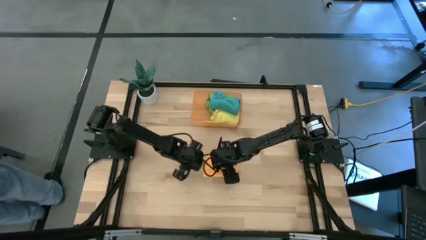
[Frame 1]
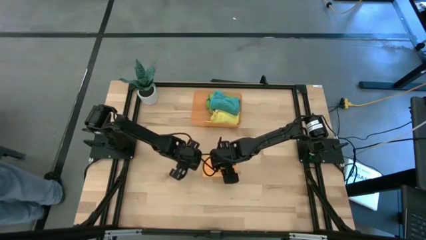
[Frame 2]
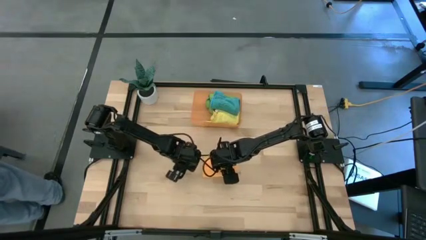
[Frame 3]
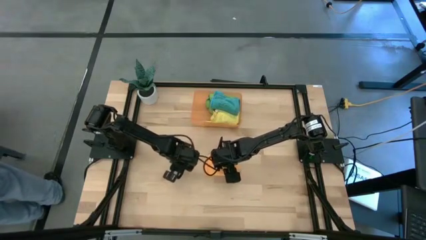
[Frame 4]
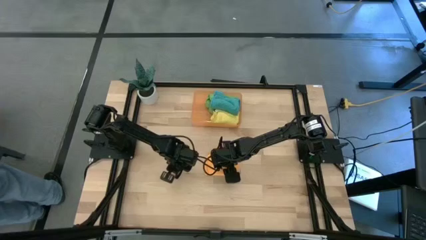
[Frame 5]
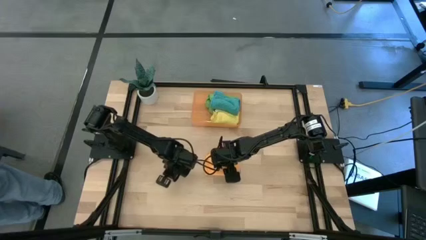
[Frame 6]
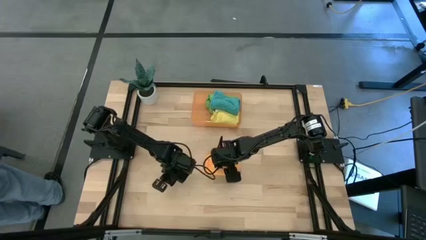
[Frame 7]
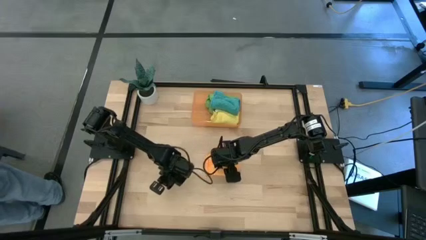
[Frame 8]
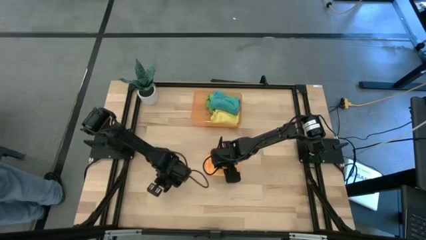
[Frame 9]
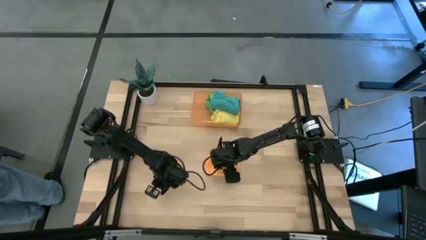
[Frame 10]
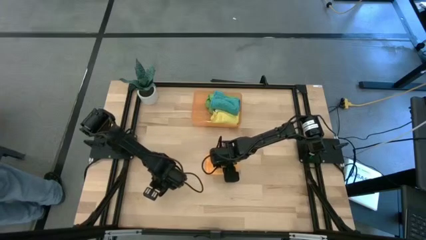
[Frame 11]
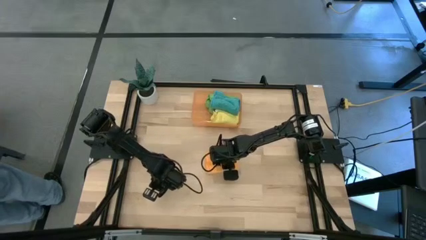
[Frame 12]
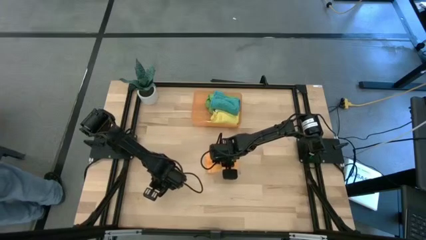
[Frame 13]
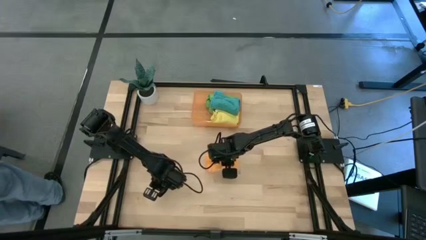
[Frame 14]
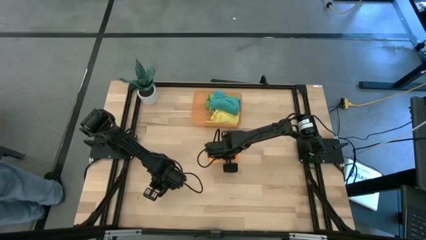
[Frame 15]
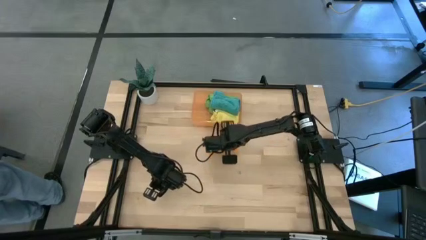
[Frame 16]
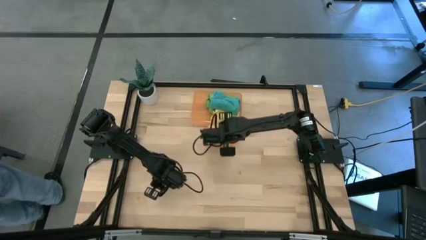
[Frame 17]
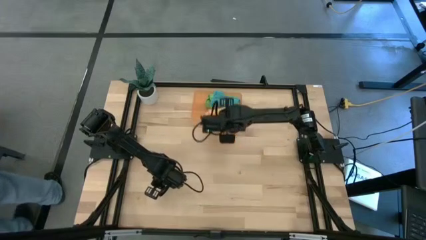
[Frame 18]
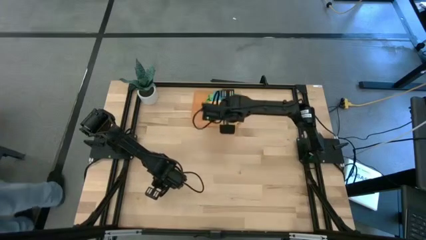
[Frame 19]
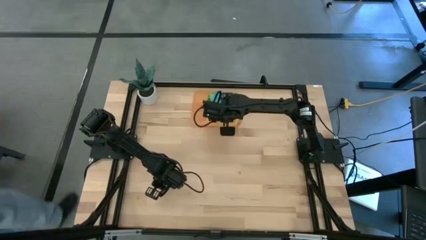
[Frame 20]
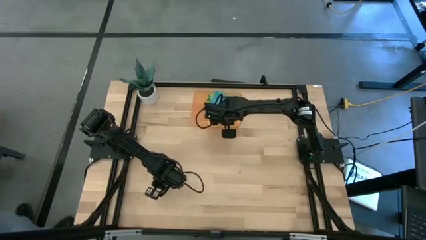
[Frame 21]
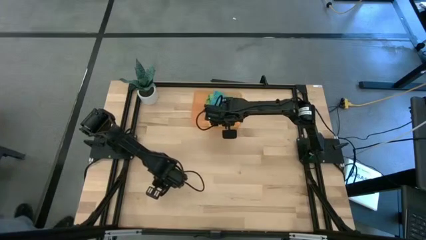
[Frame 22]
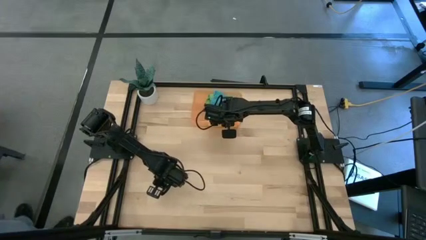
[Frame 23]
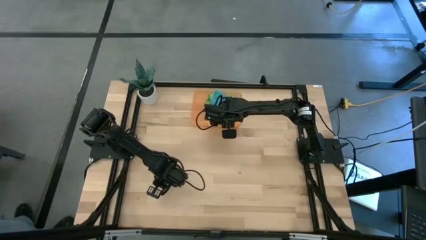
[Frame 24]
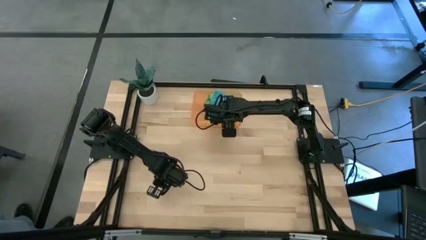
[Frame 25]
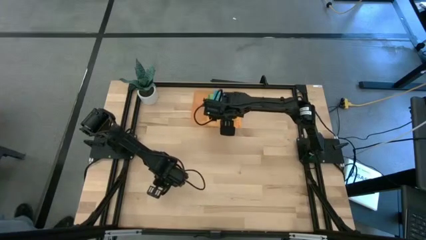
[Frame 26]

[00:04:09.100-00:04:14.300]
Task: Roll microfiber towels into tight, uniform cylinder then place into a basket
Put the rolled orange microfiber cloth into the orange bin

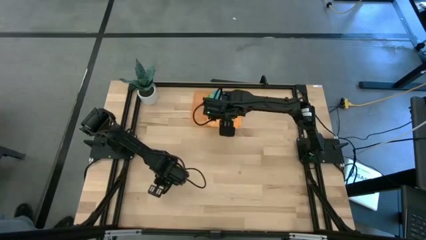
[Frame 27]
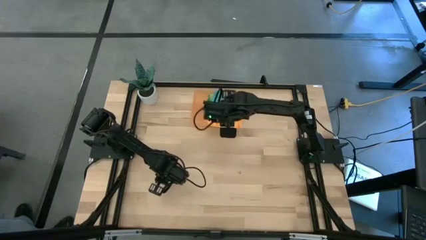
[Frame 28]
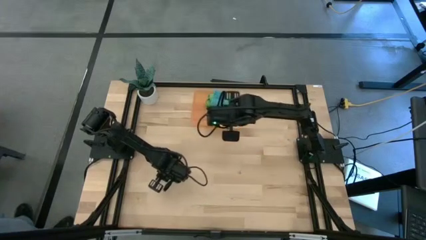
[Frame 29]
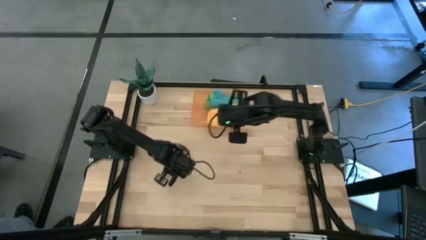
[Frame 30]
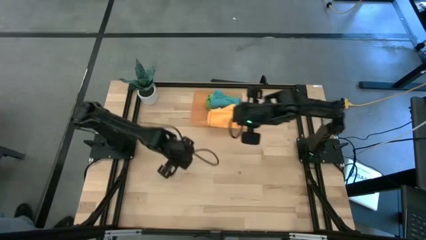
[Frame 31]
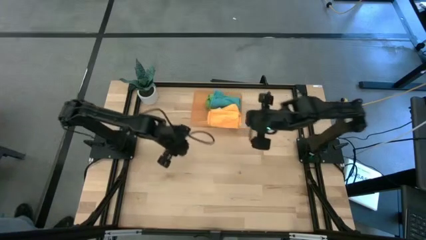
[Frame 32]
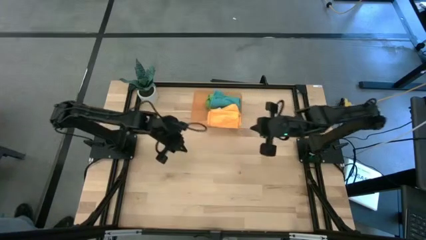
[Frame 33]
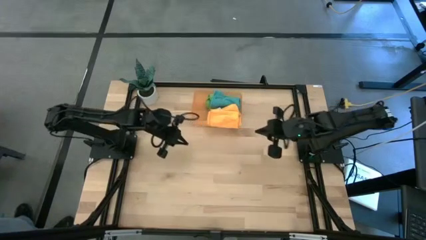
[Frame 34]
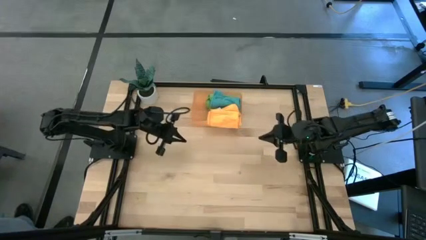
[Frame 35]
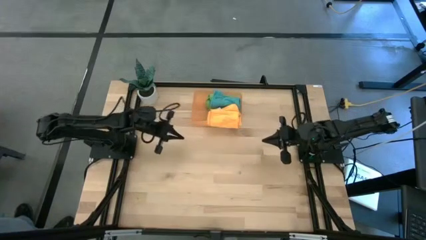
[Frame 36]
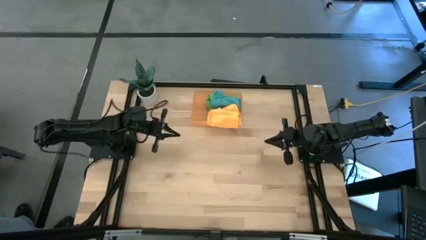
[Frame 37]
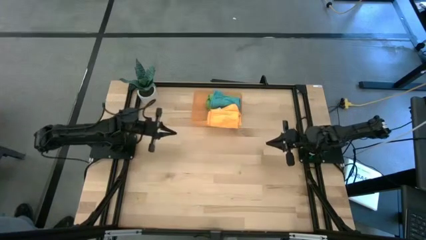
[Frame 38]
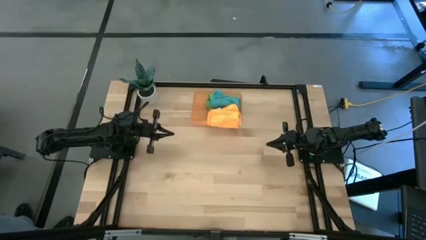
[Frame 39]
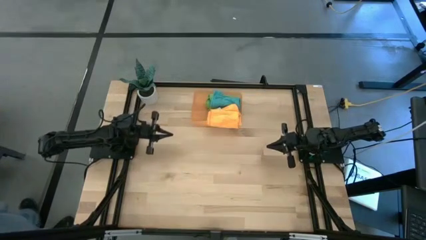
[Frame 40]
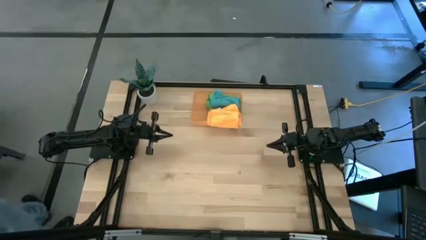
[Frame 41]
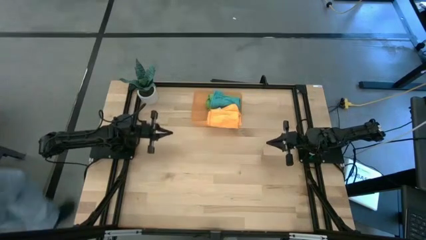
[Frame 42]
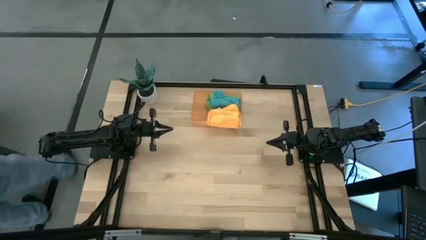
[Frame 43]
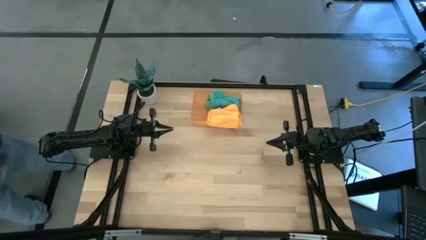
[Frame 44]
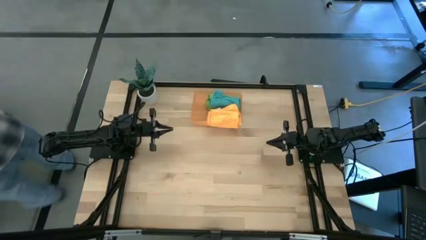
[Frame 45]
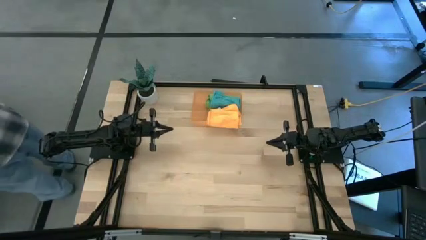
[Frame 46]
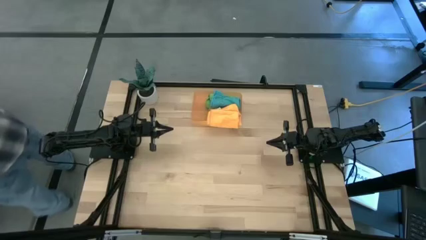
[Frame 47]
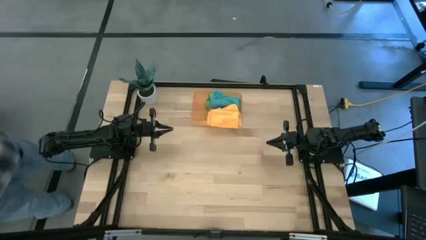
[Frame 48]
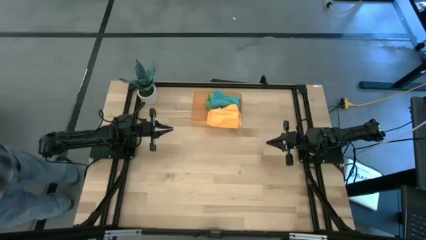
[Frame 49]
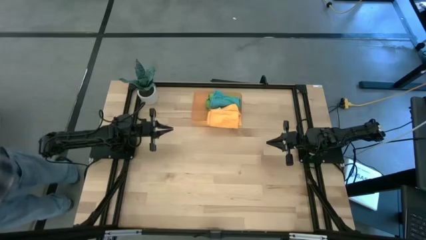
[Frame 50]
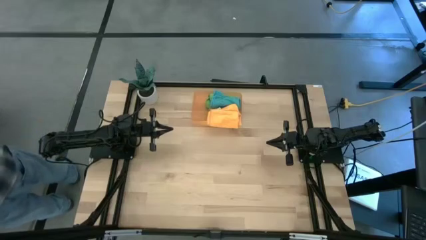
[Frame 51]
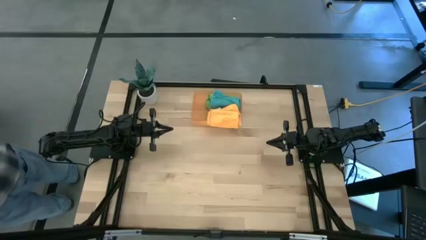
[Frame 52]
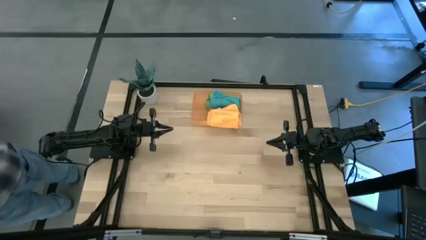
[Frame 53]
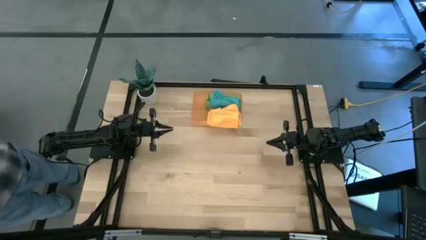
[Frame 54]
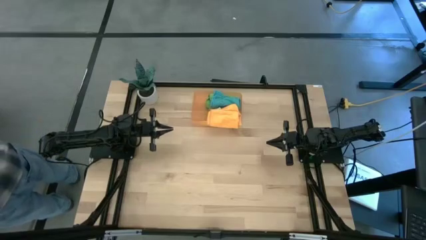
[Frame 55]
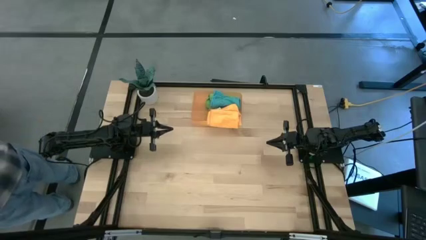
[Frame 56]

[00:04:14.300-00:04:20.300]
Return to Home Position
